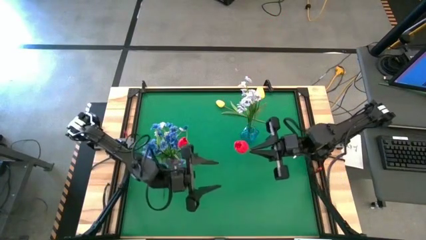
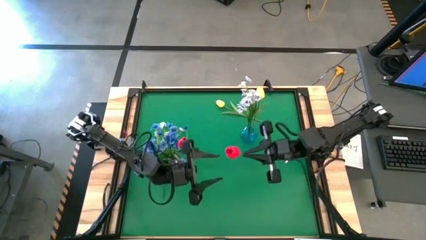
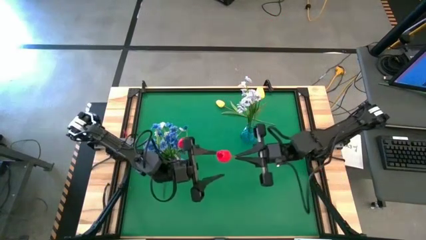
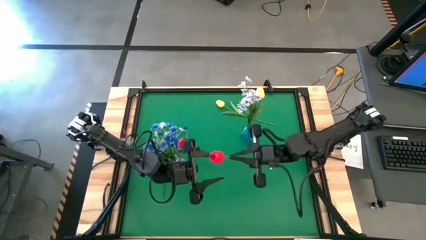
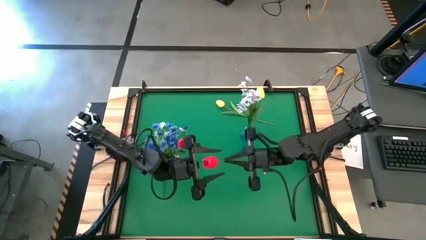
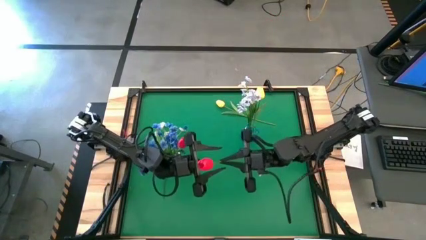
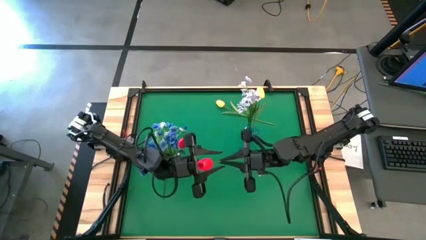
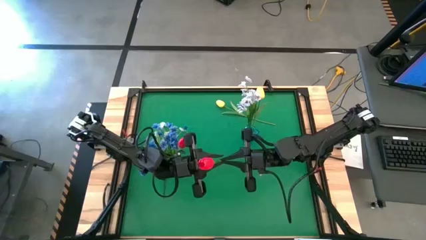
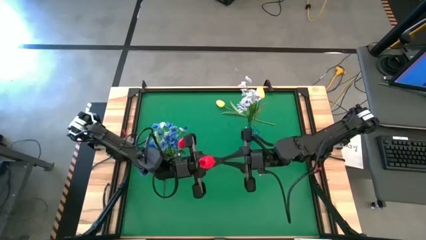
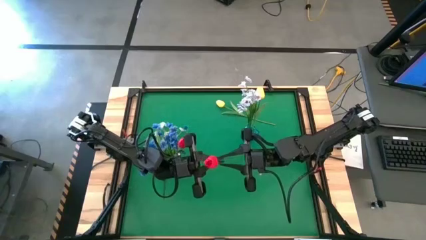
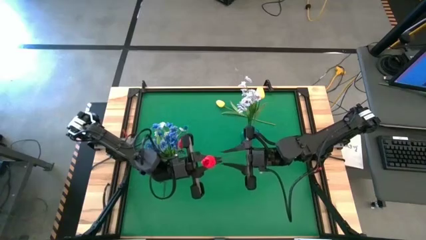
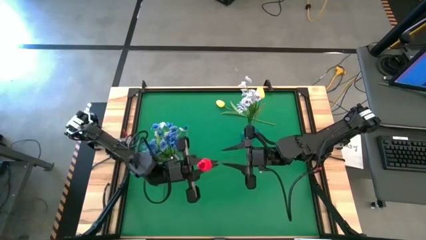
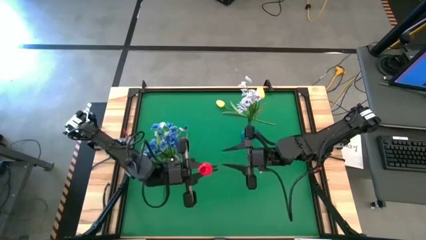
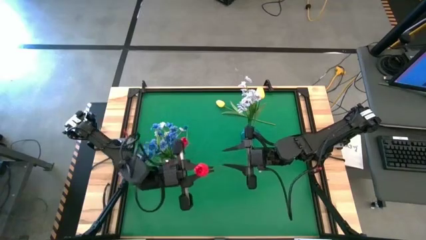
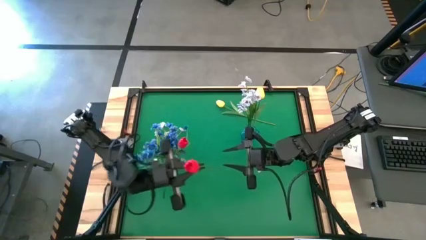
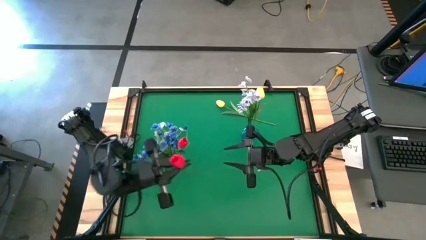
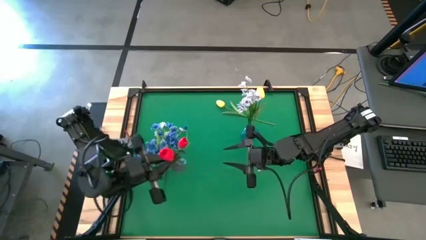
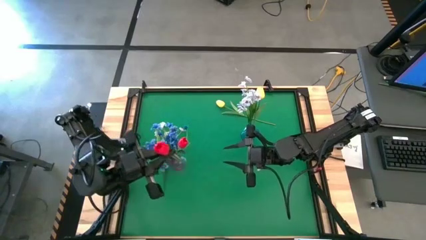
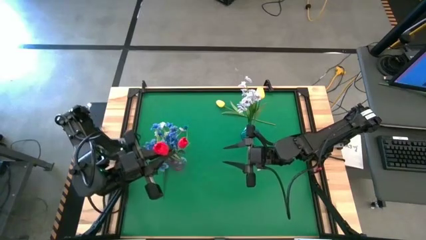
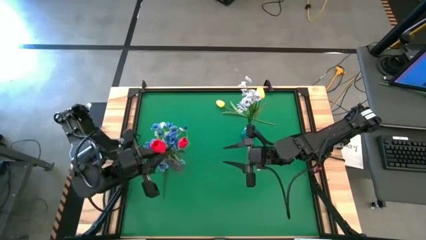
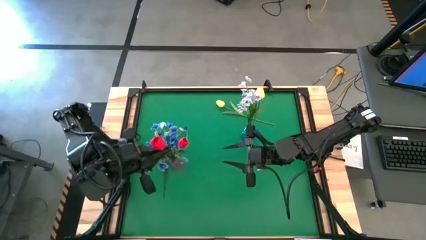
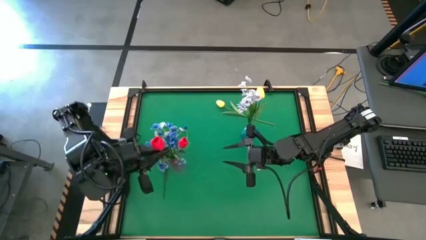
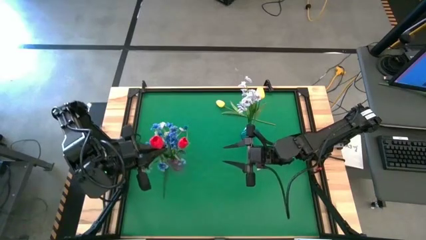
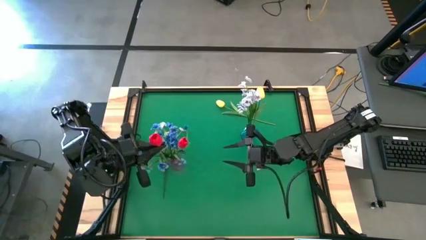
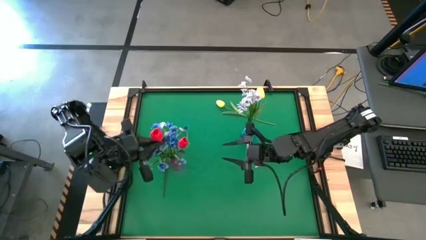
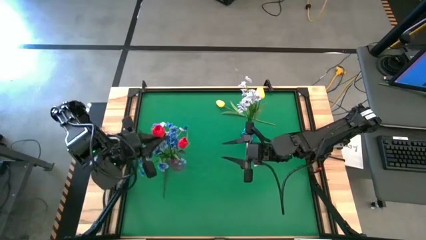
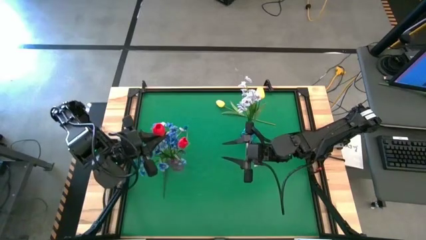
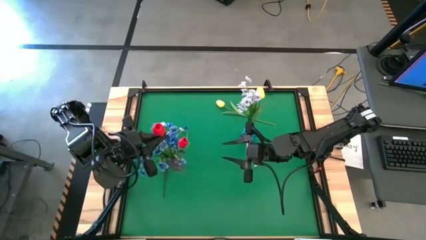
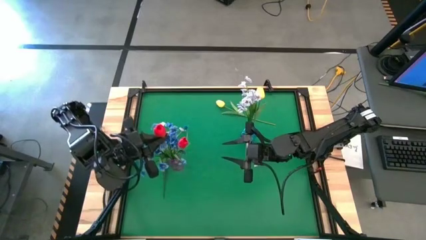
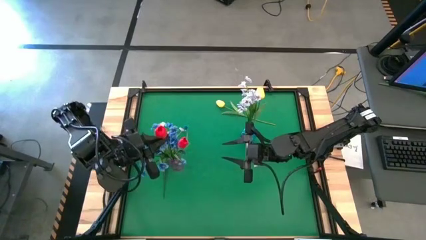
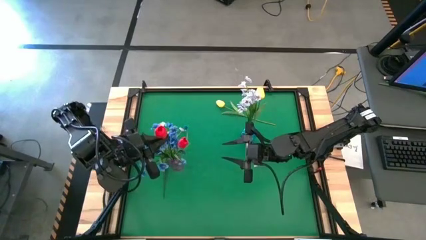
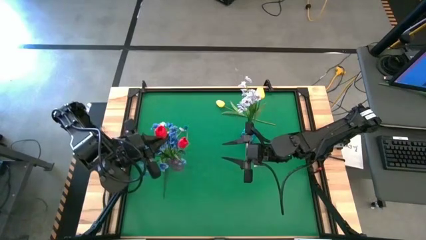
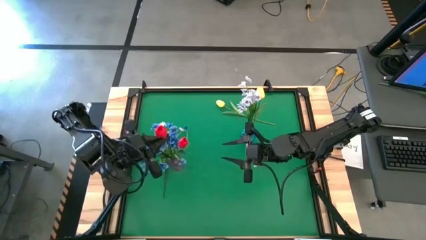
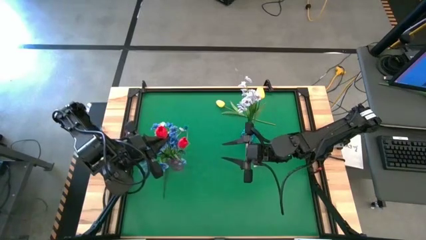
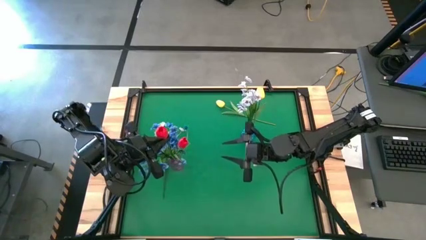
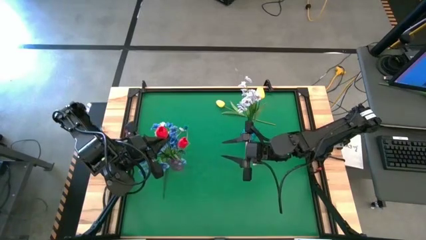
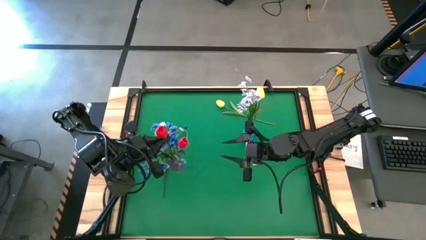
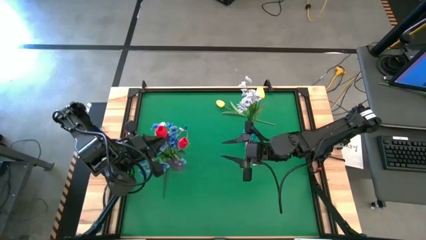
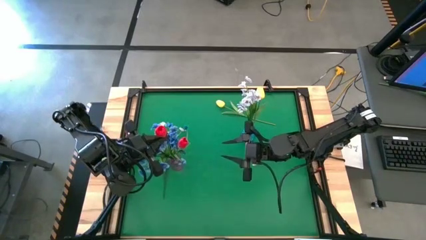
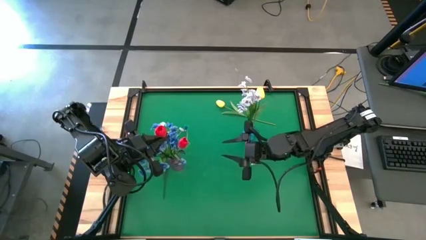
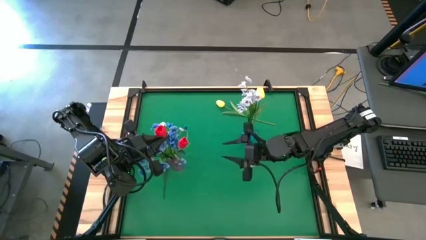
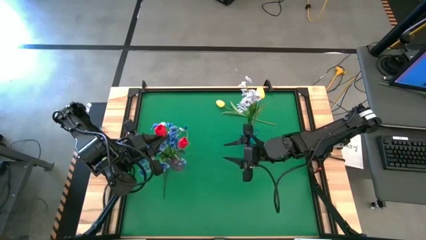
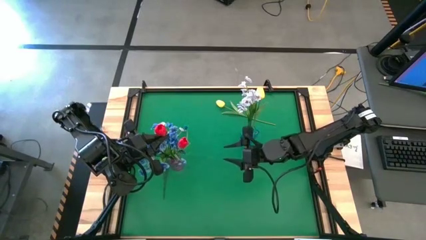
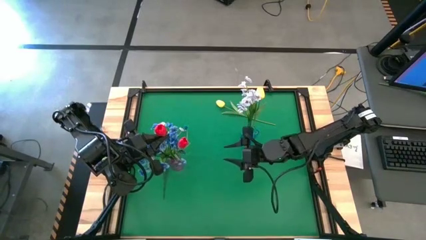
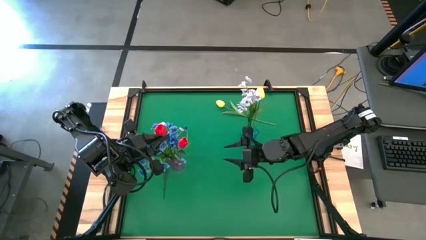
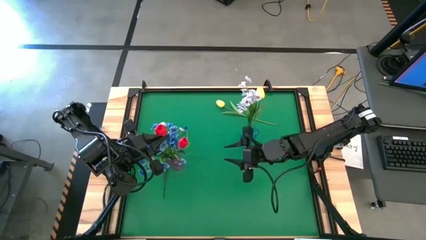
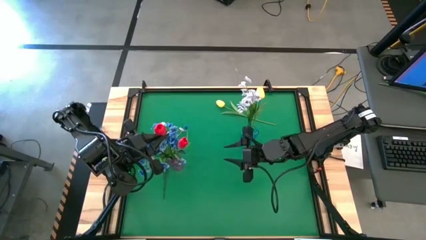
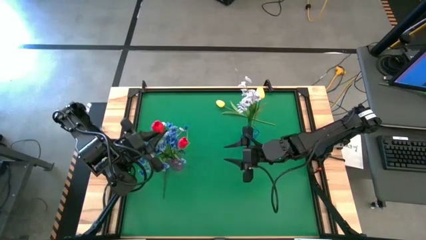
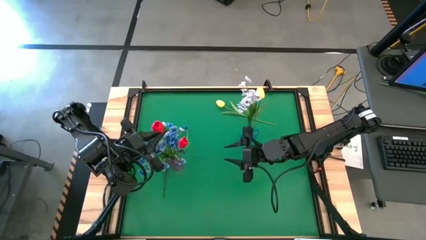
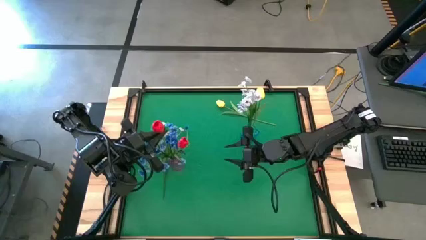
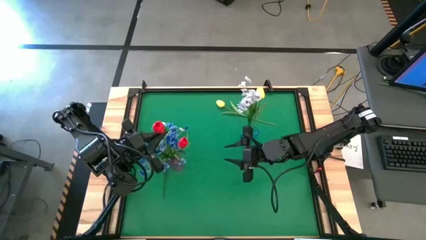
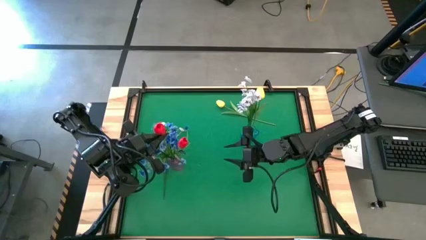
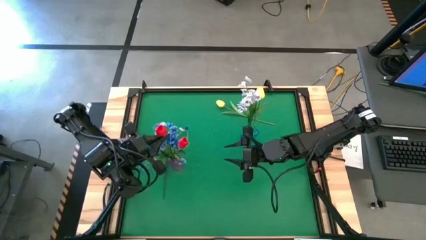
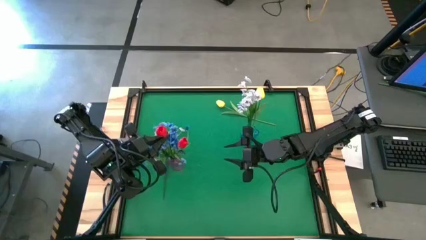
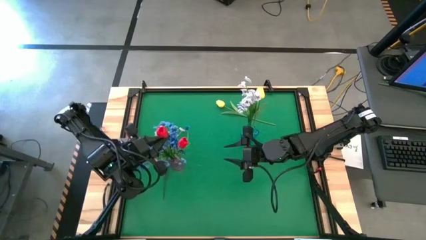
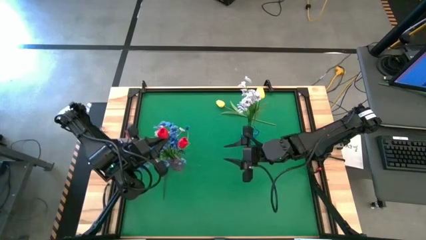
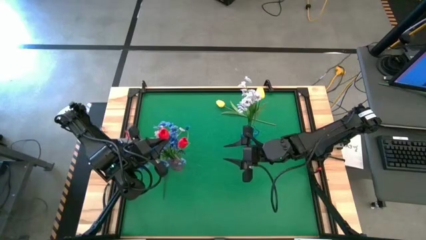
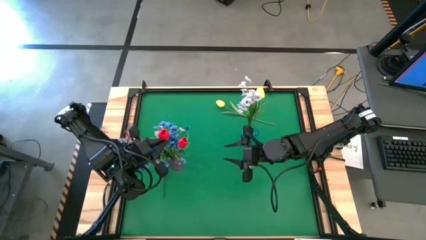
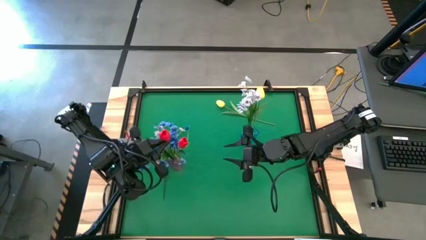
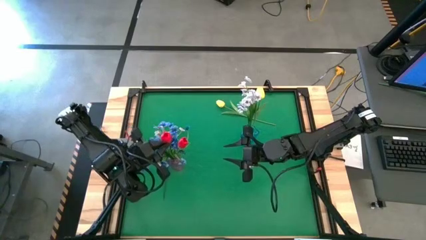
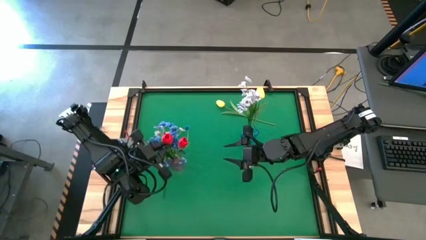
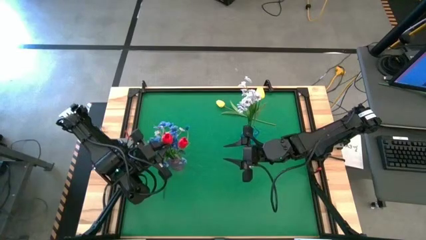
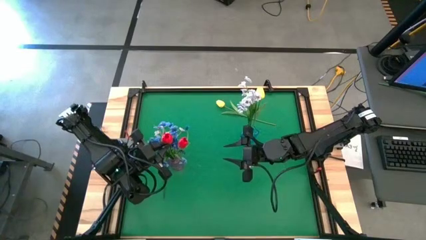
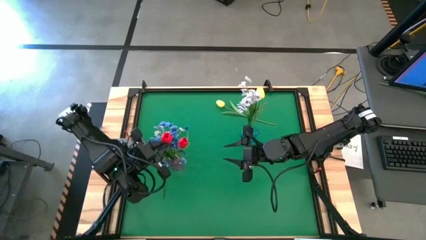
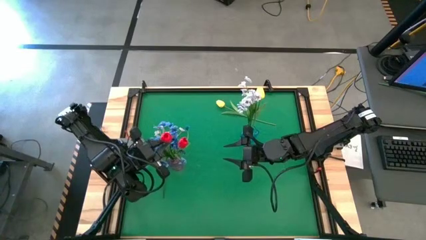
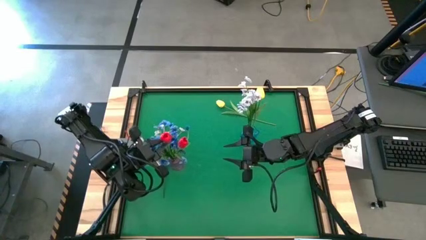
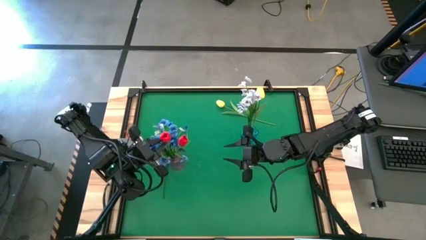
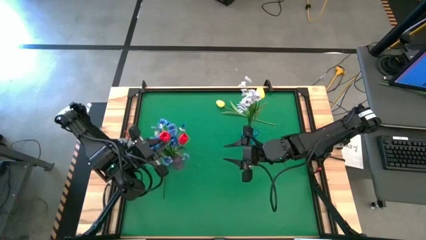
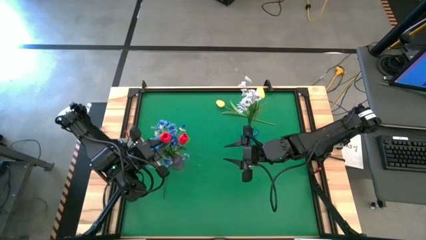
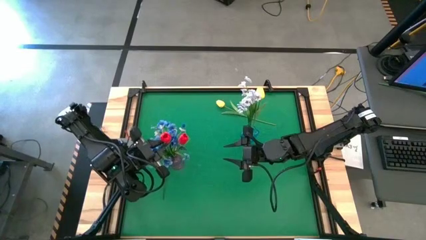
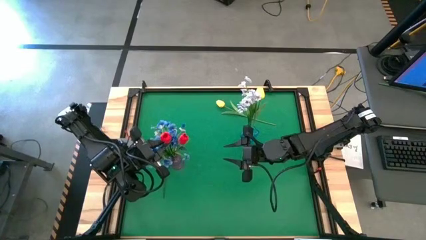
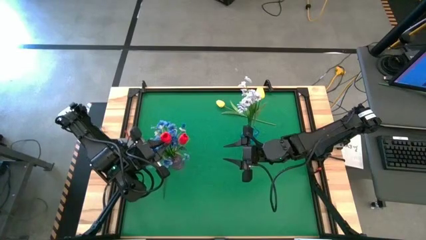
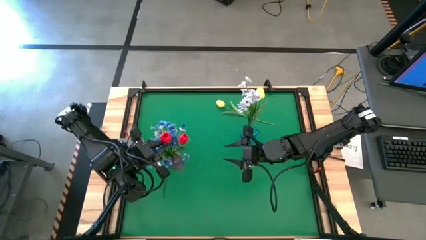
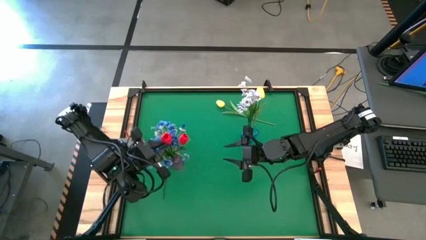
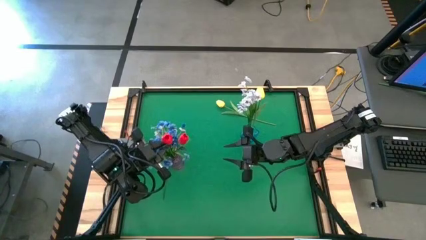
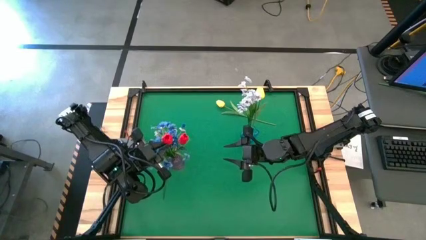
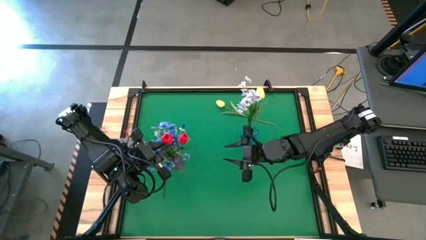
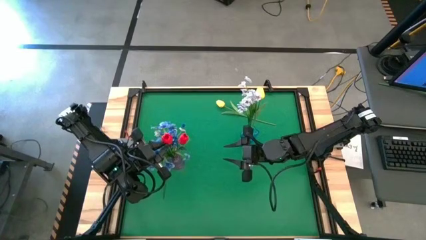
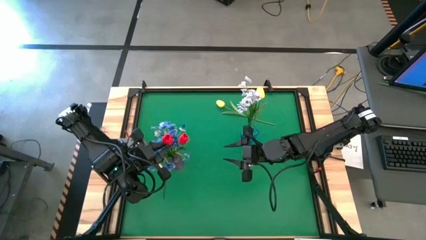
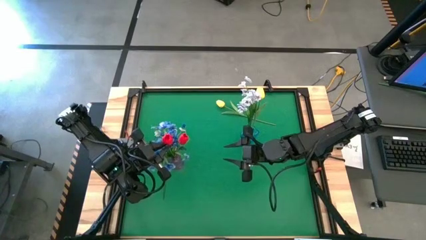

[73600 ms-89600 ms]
Task: Sort flowers into vase by color
Put the red tulip into the violet vase
